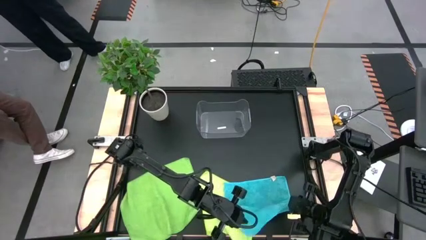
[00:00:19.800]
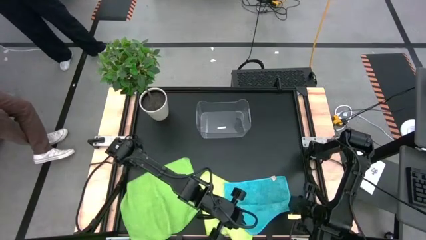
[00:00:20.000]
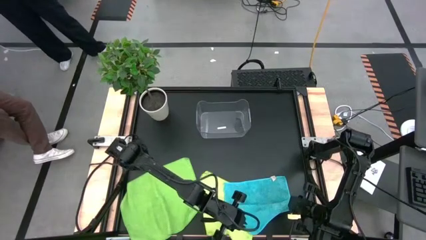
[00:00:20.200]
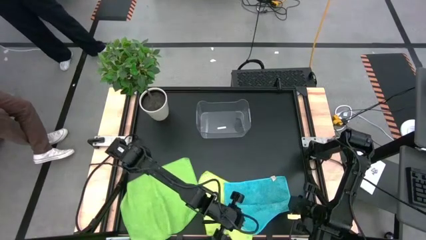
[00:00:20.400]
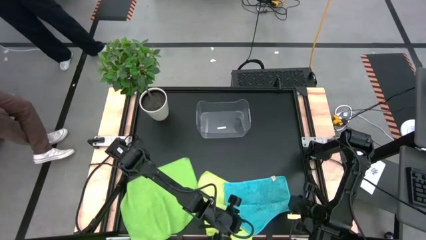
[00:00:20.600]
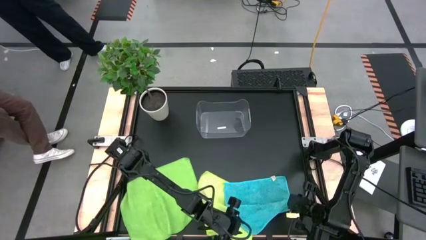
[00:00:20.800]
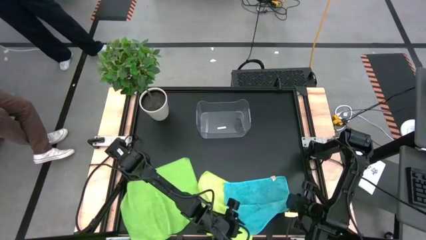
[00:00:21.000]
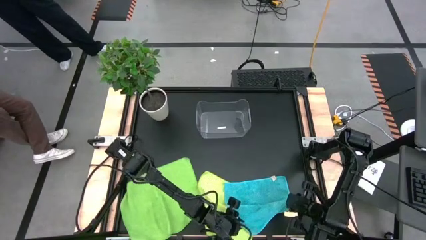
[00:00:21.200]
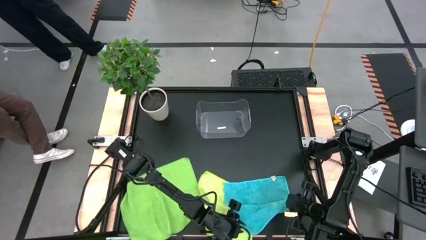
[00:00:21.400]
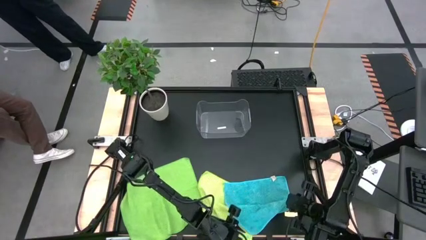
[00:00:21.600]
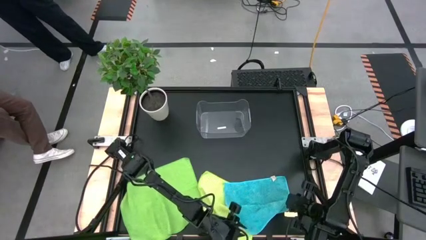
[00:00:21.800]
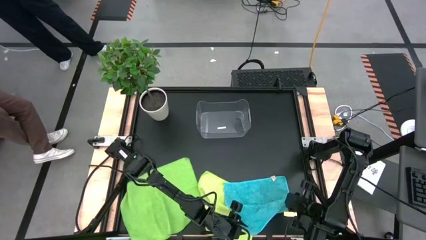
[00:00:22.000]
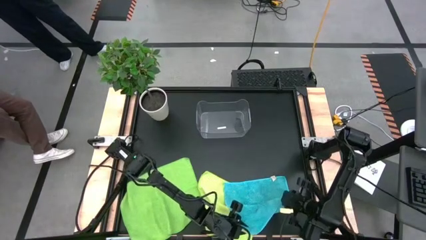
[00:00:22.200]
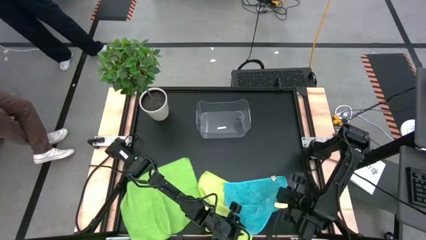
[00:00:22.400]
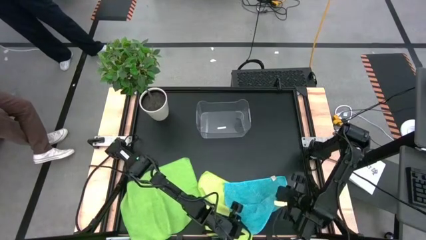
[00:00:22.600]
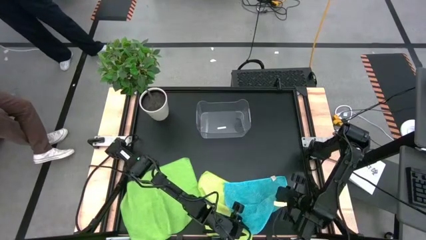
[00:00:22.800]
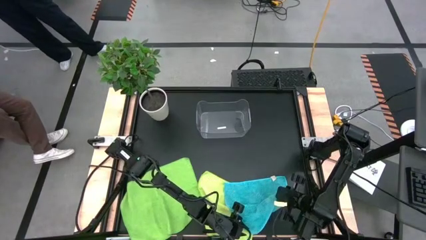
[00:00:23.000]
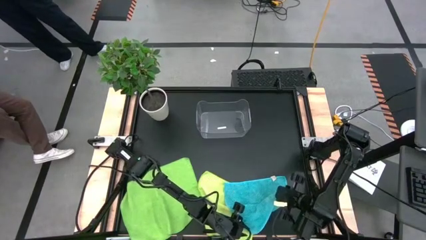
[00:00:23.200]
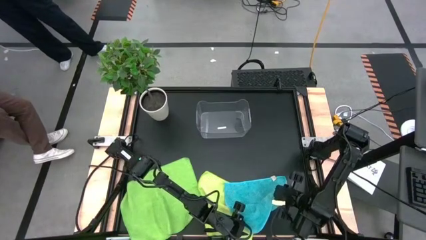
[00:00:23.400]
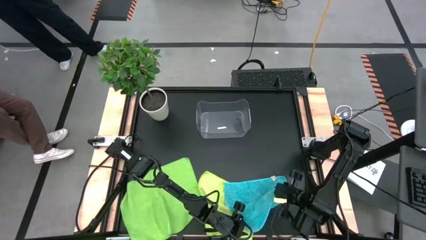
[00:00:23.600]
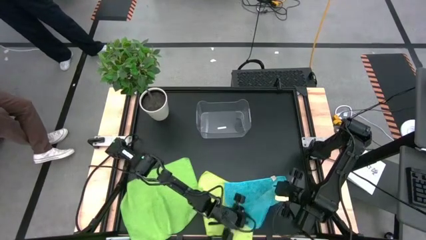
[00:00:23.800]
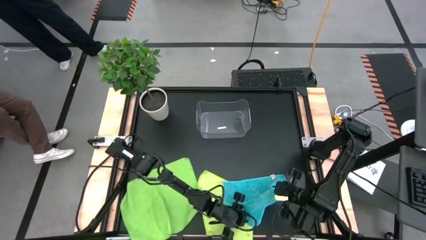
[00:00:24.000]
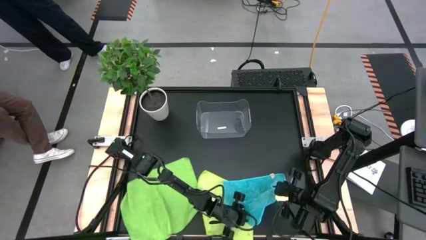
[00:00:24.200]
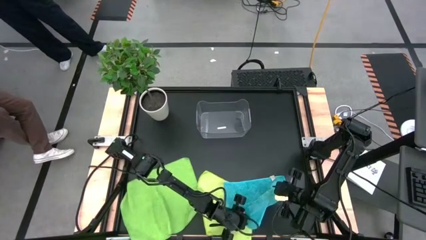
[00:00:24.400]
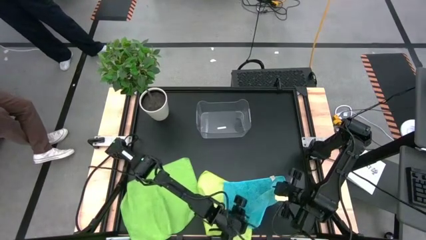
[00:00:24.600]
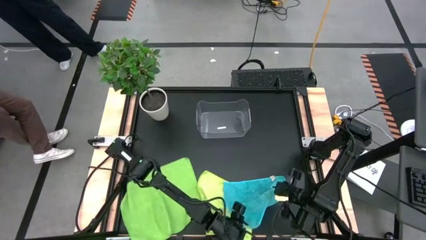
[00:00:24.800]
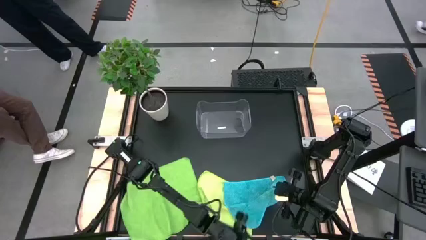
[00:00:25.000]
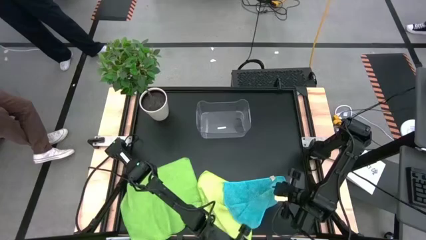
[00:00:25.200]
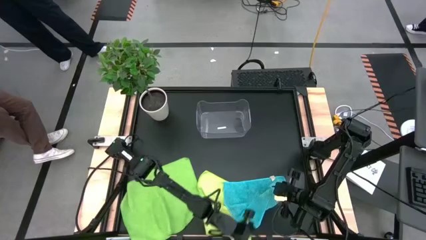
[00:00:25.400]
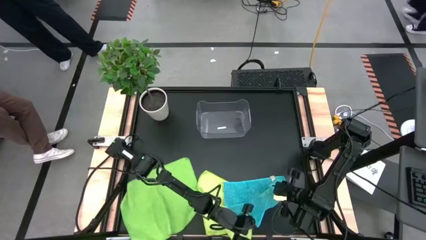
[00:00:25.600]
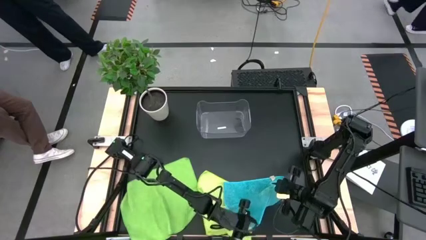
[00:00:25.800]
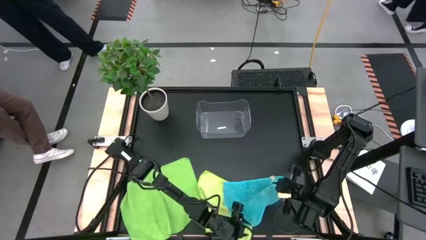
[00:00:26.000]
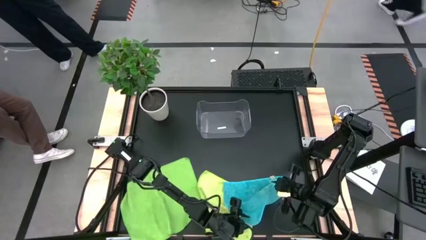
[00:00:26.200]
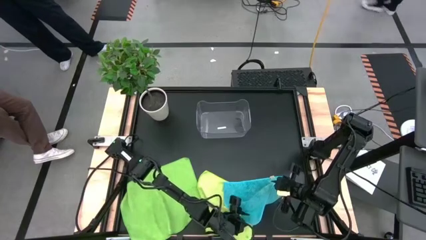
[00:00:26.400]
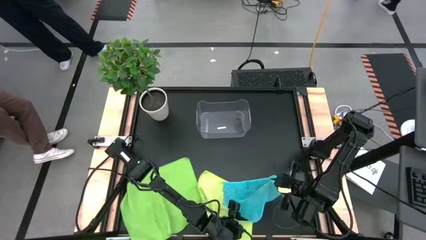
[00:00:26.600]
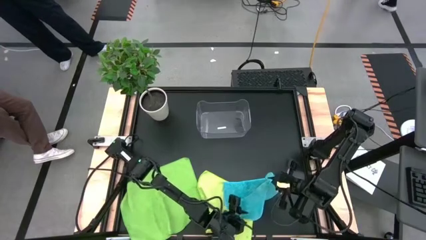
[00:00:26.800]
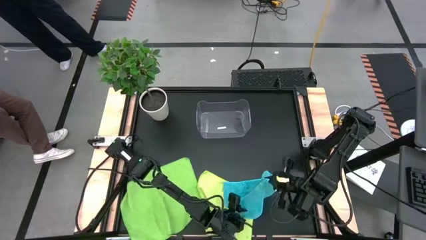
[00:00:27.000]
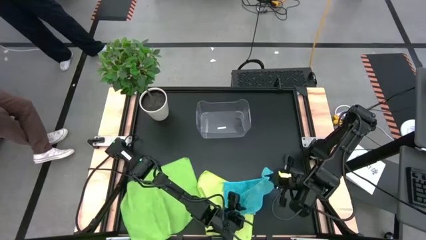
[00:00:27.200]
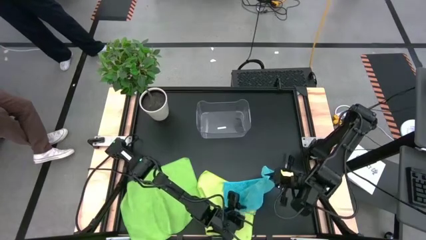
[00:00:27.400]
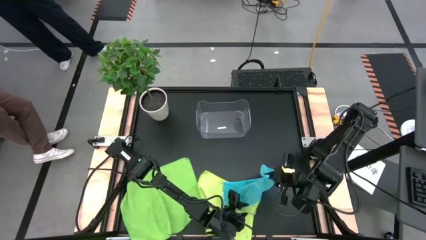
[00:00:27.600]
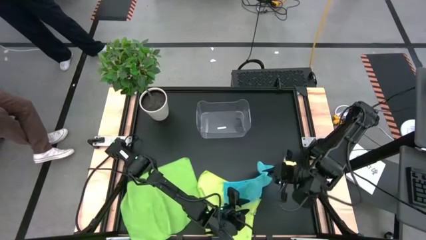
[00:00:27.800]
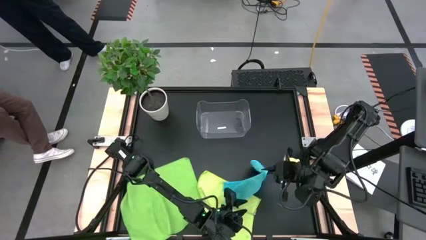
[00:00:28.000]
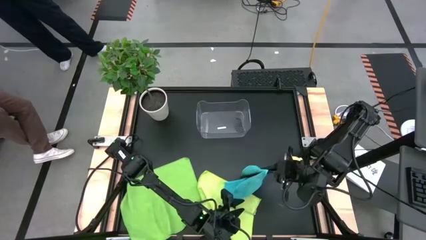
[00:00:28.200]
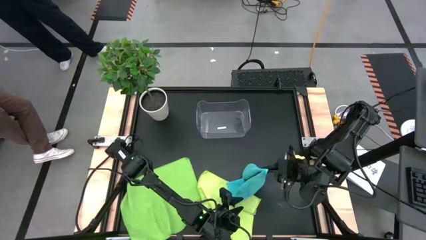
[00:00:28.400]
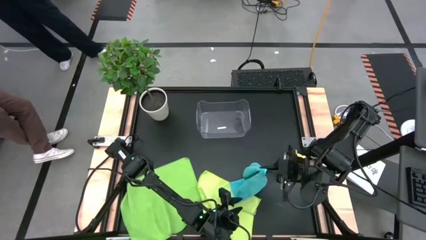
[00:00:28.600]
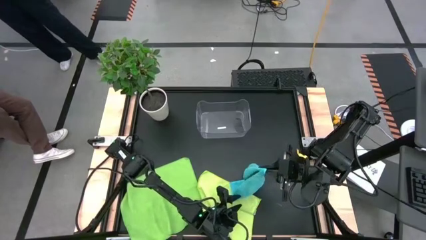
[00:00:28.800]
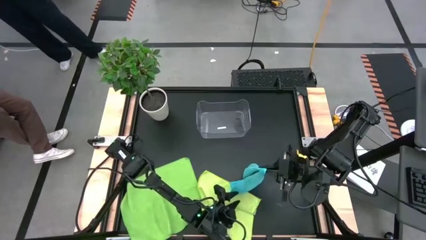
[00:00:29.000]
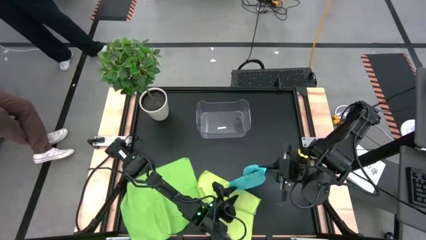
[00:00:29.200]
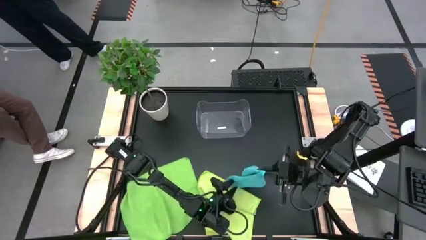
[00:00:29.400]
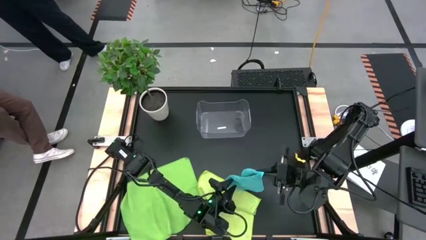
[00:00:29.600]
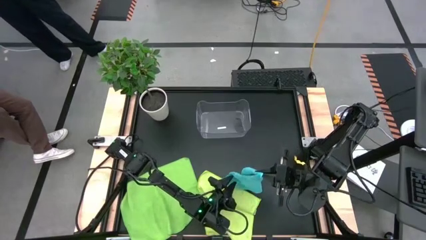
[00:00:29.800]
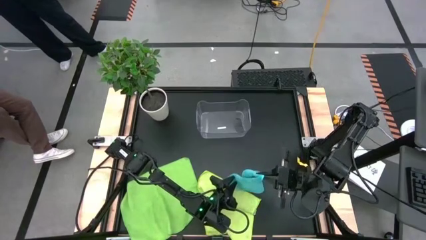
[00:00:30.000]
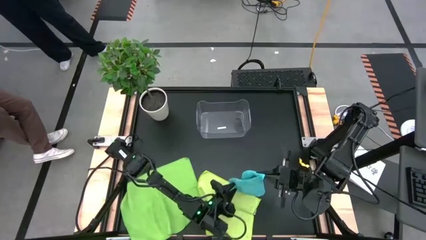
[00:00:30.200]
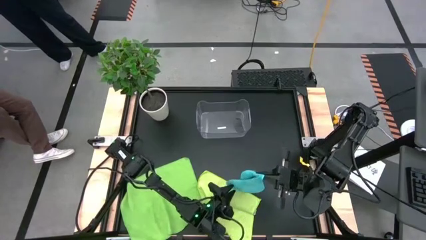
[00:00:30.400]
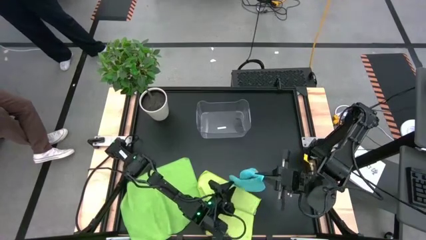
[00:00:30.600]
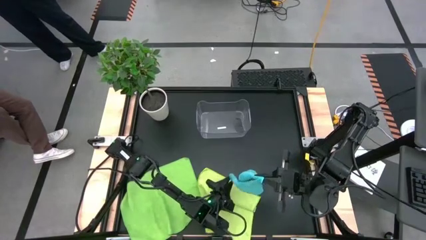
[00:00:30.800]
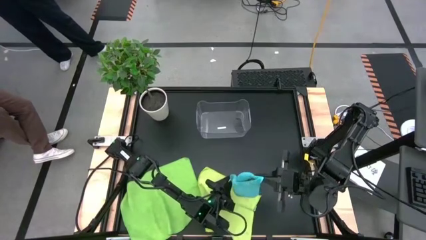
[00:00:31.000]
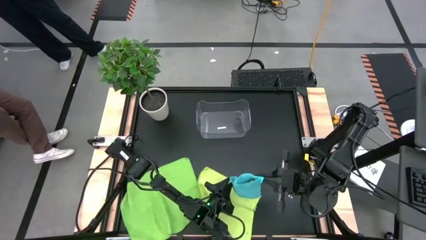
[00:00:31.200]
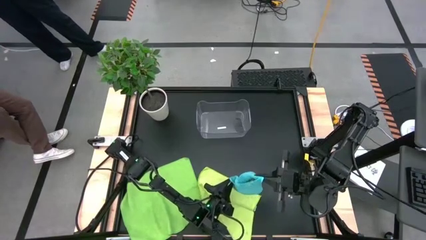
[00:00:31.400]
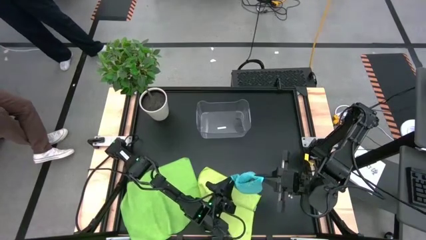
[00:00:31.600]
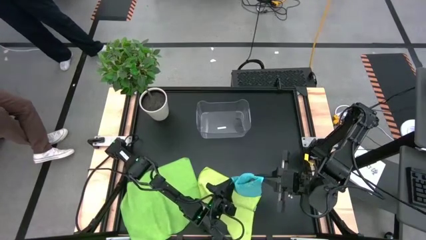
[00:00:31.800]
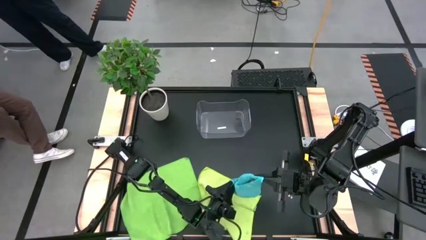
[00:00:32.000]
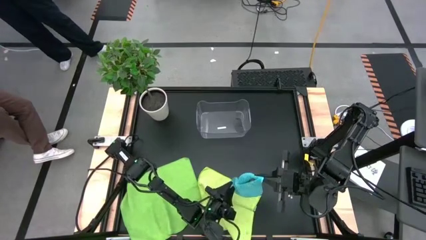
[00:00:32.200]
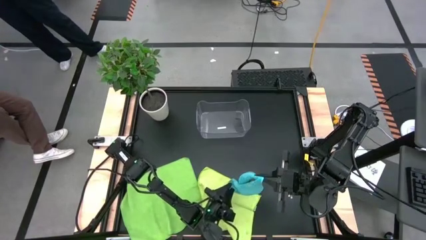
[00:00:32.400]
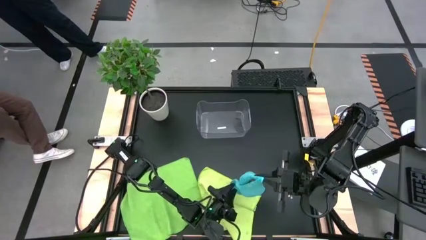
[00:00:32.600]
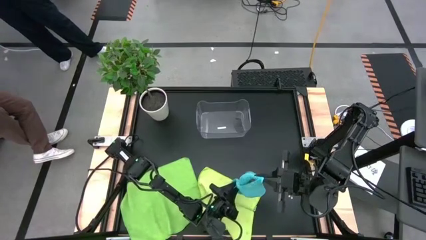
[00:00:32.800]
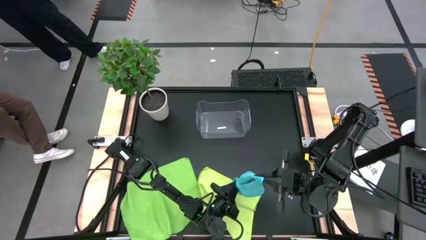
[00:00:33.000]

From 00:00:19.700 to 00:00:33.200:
Task: Fold microfiber towels
Fold the blue towel

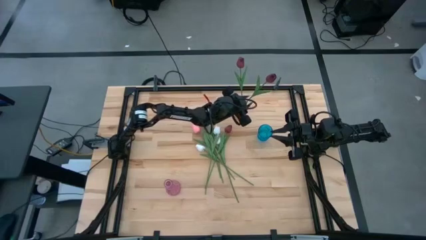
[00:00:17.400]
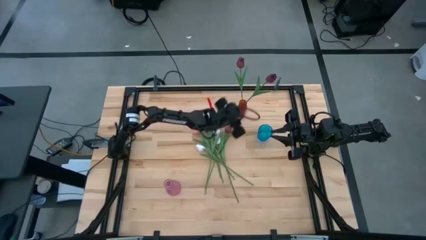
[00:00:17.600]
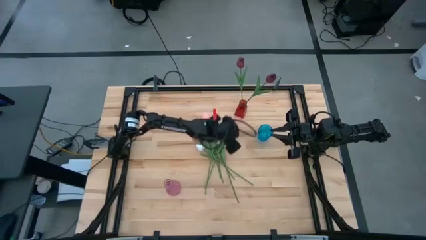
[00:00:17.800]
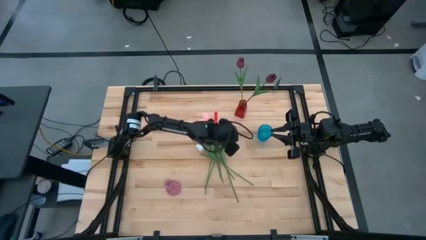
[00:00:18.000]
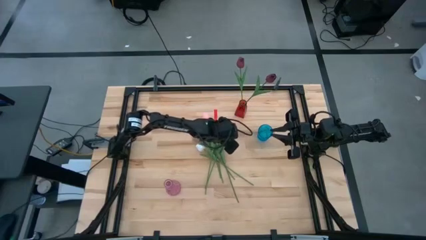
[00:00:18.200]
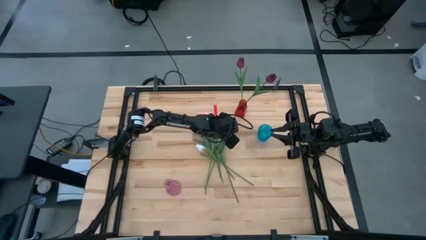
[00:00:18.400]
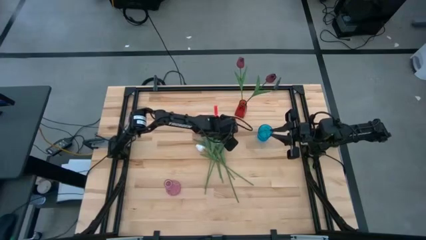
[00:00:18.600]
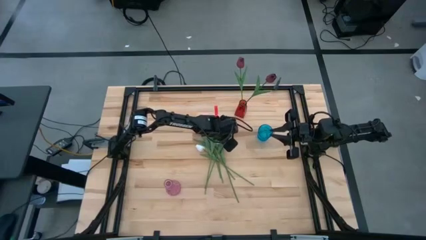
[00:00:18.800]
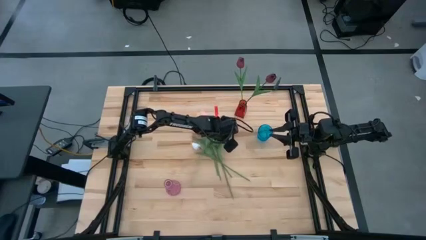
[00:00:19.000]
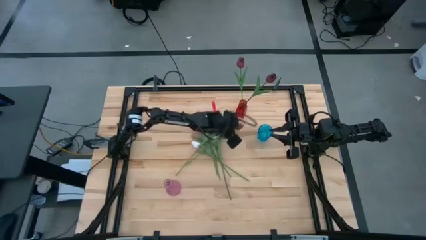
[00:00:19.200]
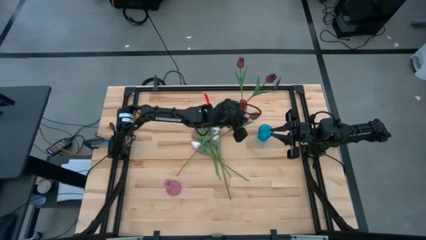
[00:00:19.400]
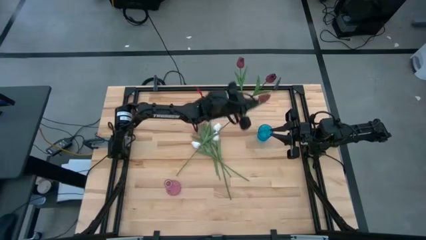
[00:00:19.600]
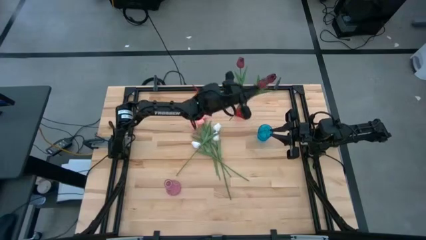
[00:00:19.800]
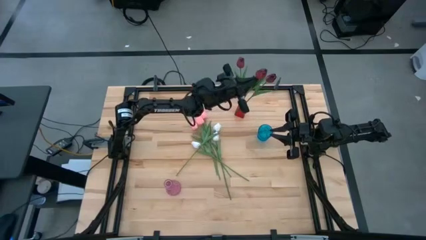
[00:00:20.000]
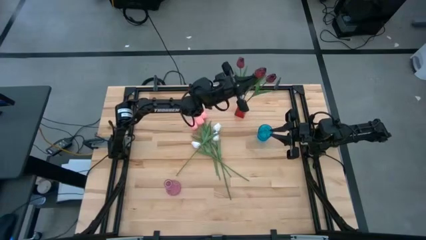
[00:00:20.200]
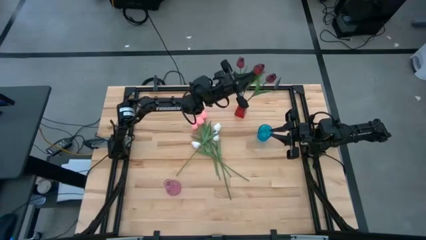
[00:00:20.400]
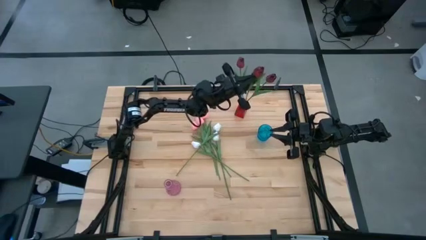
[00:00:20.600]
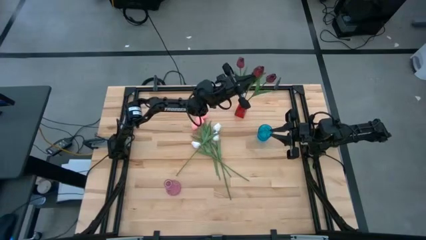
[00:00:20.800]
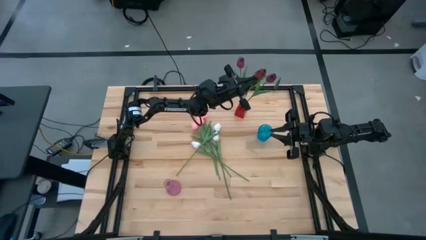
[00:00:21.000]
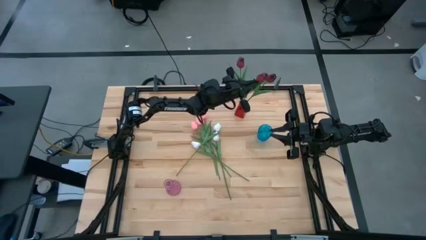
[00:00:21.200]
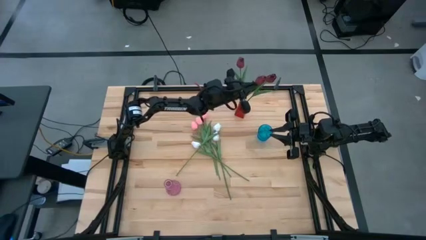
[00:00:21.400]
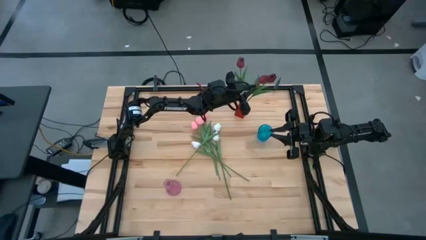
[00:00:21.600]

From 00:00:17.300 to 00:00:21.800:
Task: Sort flowers into vase by color
Put the red tulip into the red vase
